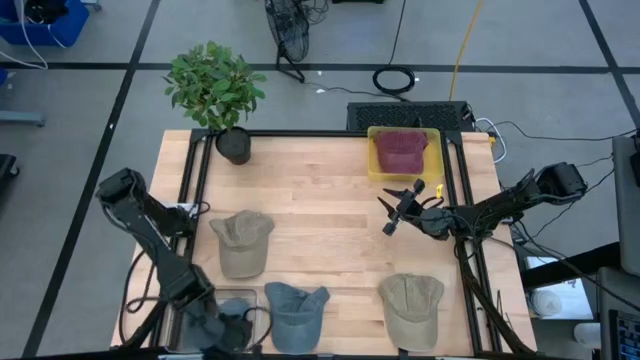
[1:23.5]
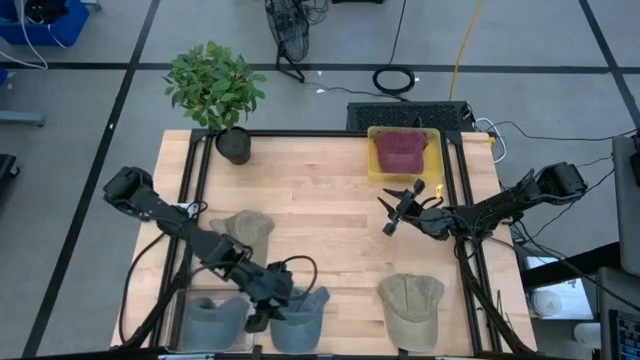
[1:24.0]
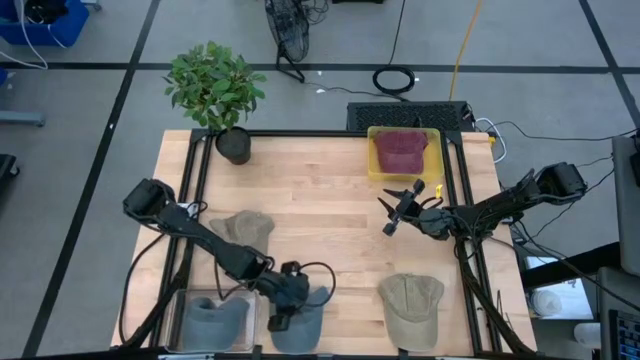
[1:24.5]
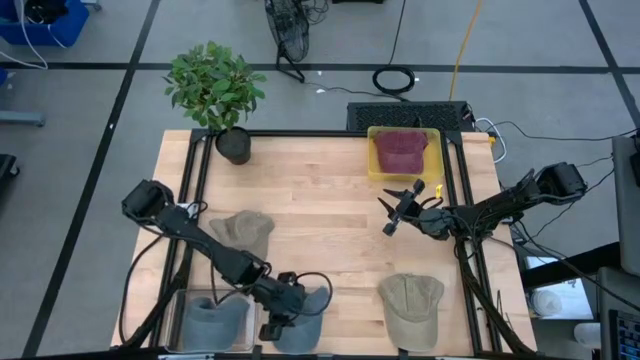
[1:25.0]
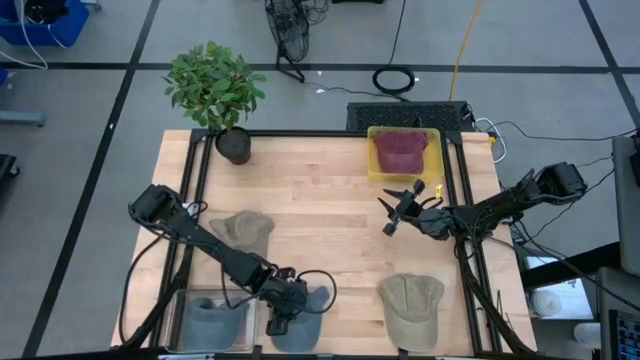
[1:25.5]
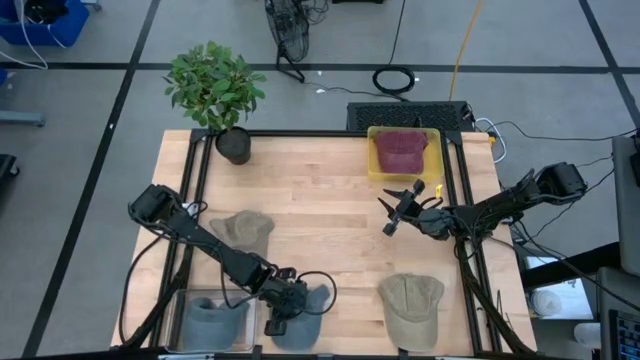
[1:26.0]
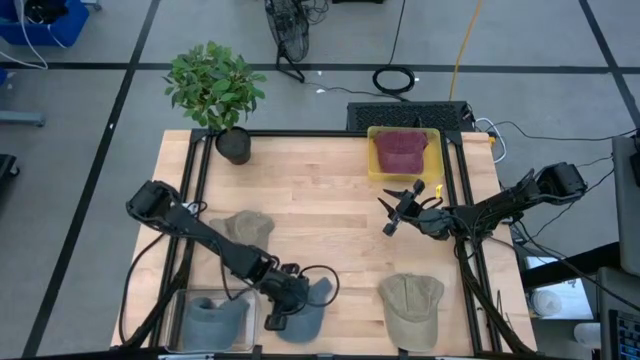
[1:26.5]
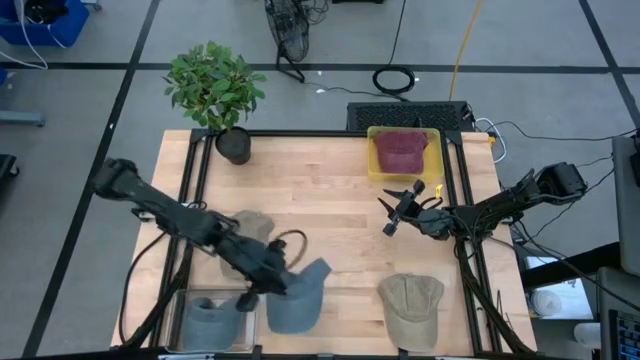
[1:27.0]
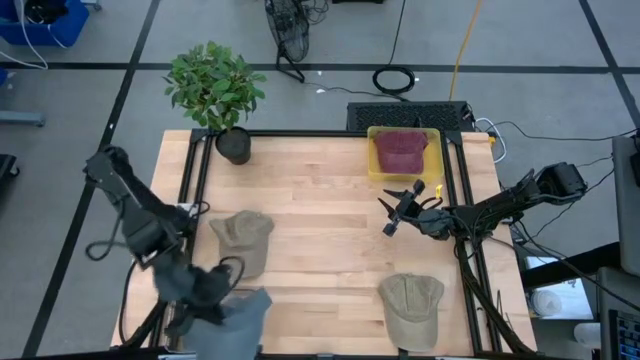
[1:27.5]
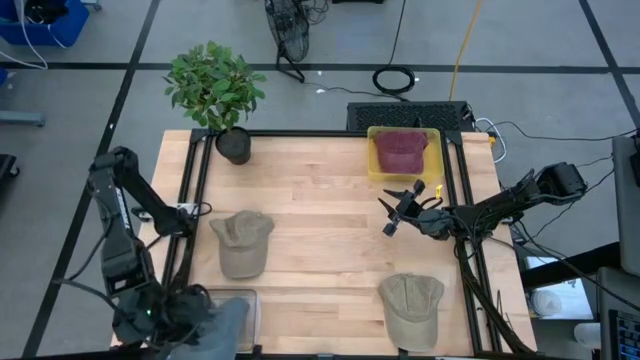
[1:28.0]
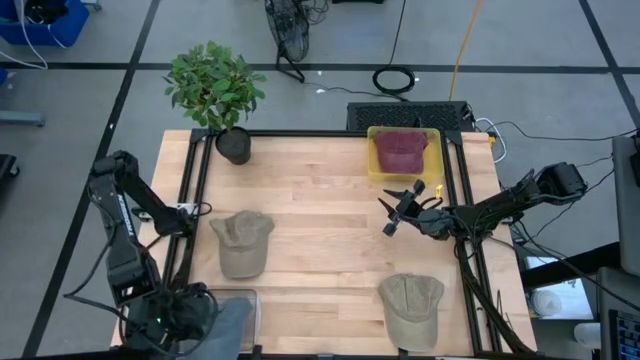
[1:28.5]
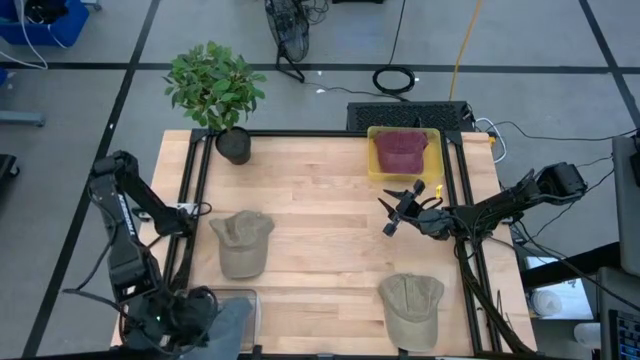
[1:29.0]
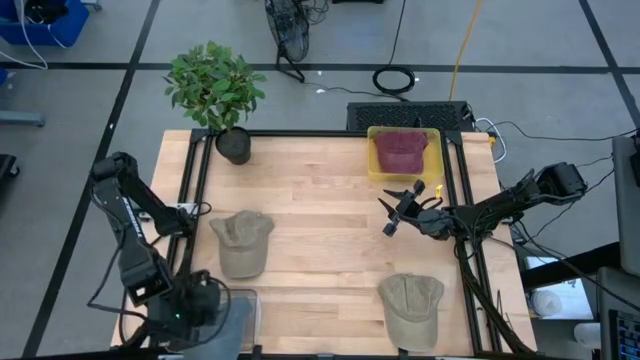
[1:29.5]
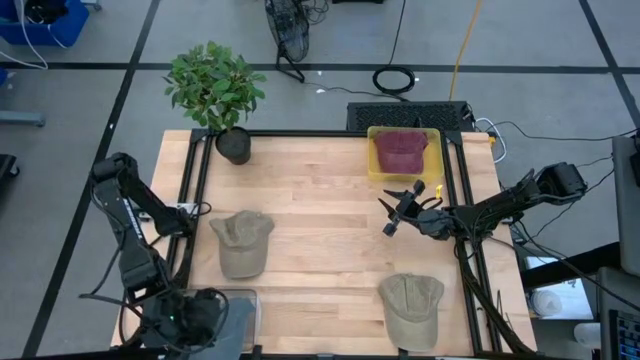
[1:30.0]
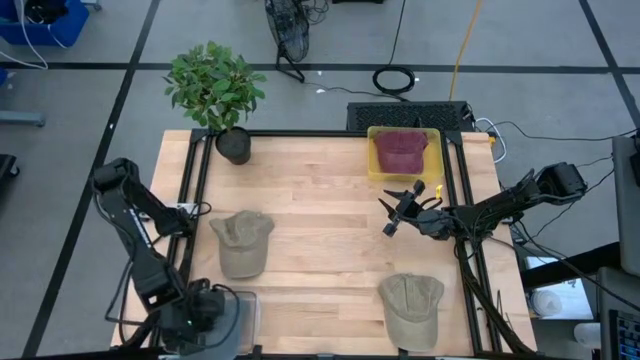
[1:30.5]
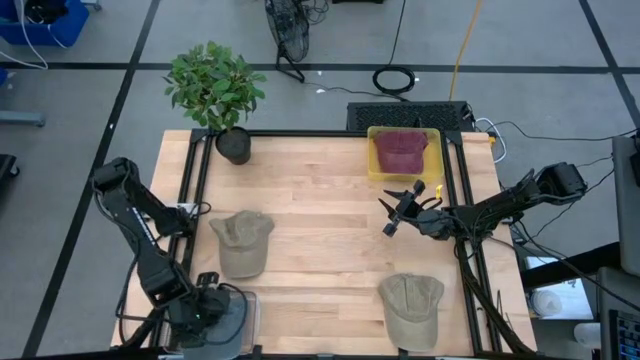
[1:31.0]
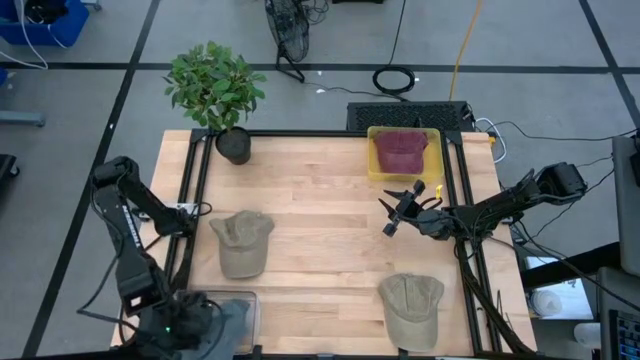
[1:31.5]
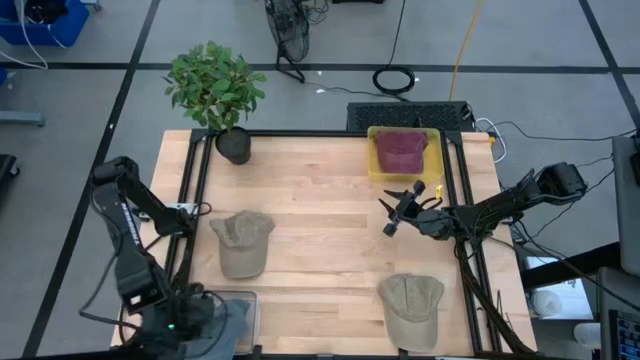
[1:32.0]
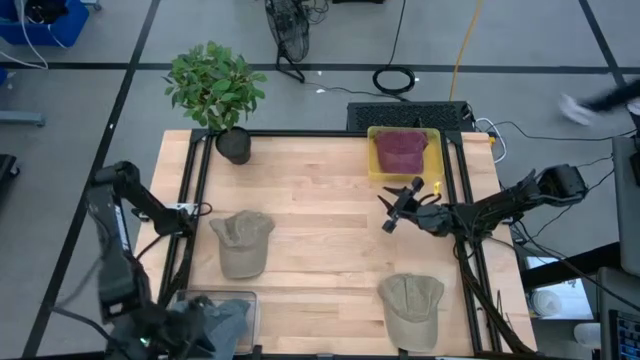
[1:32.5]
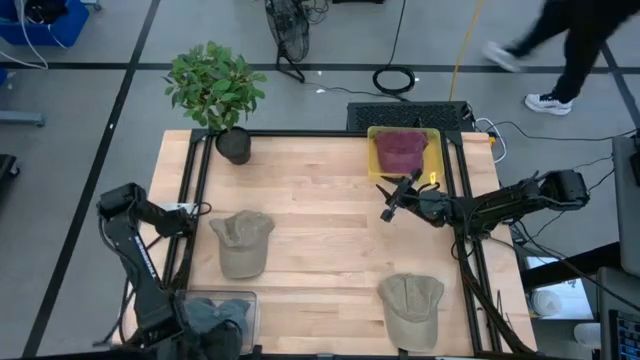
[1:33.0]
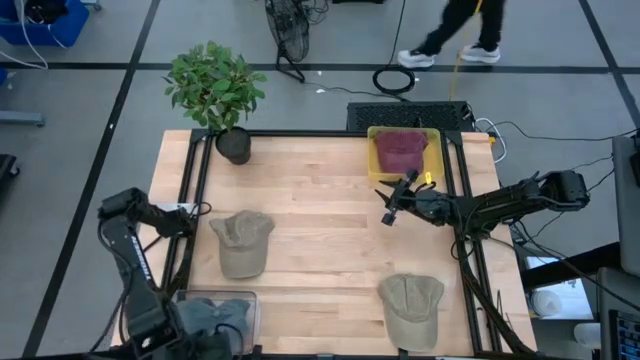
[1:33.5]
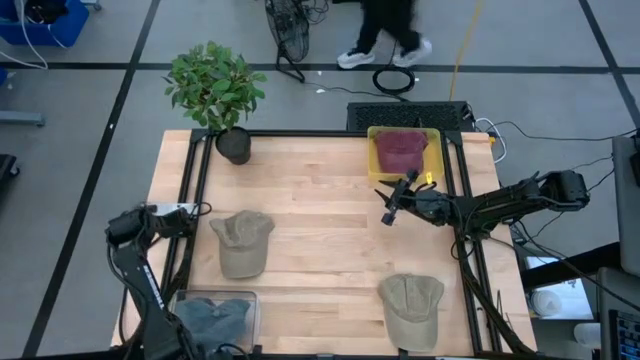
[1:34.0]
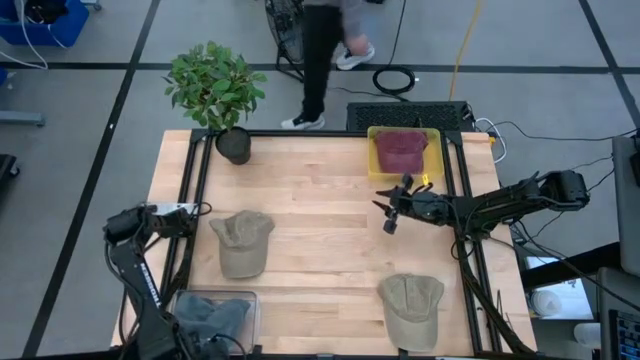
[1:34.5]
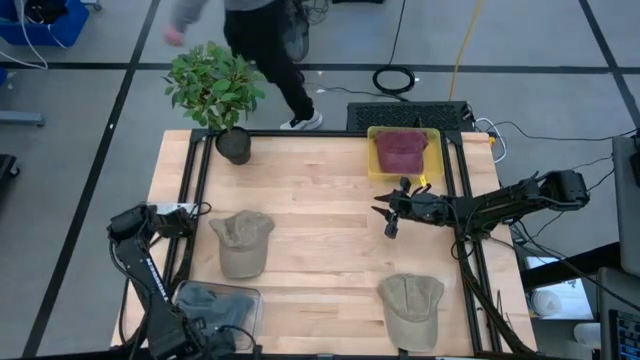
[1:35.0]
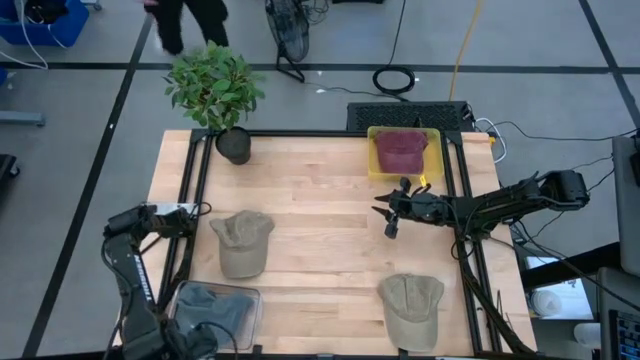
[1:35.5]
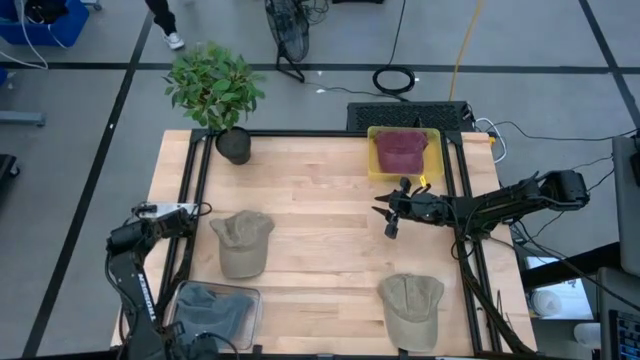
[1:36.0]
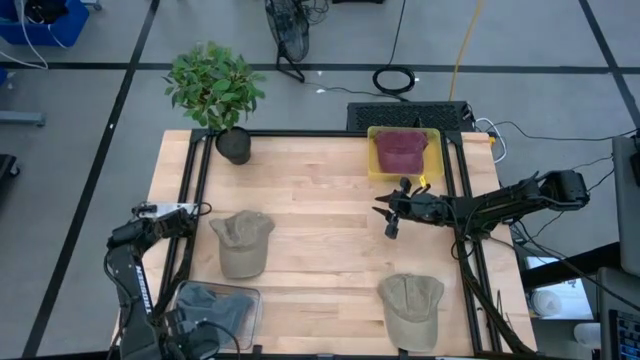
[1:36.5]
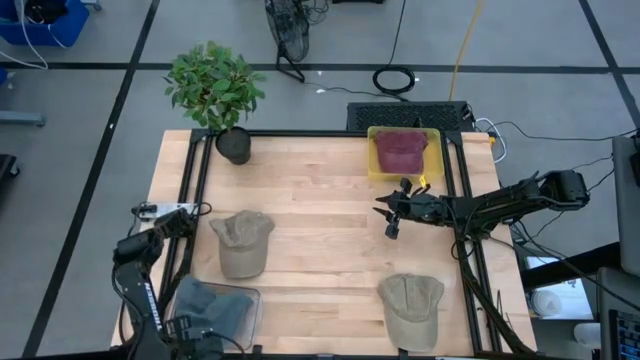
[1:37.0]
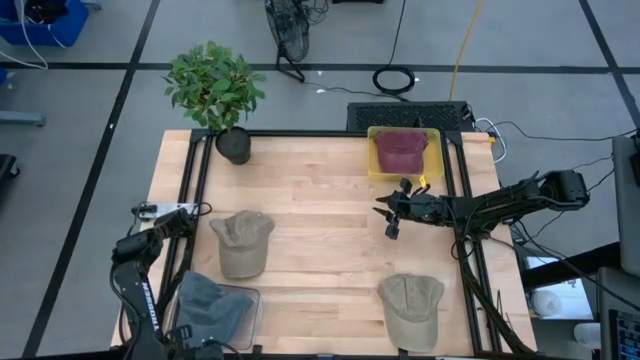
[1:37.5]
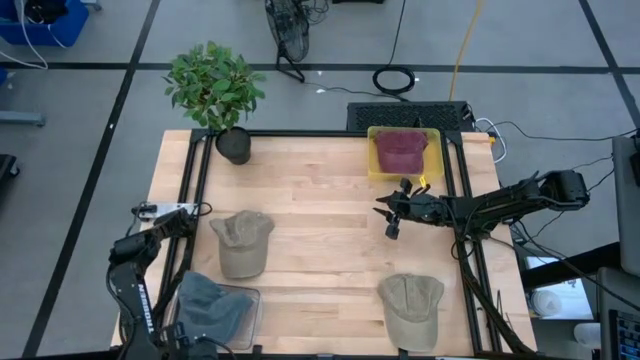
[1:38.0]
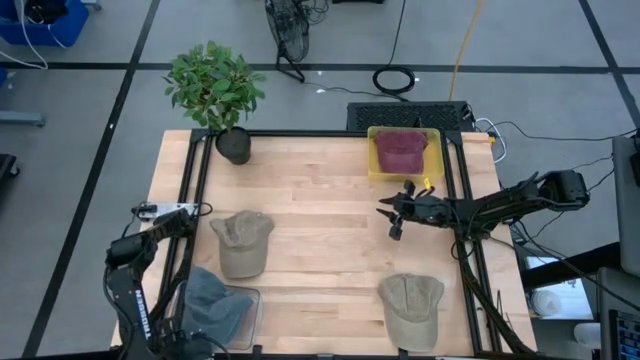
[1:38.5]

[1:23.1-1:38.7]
Task: Pick & Place hat
Put the gray cap into the transparent bin

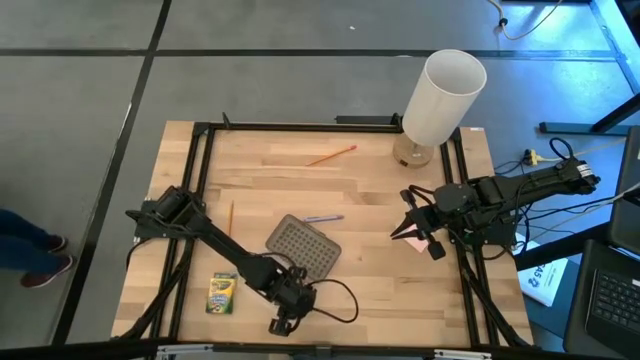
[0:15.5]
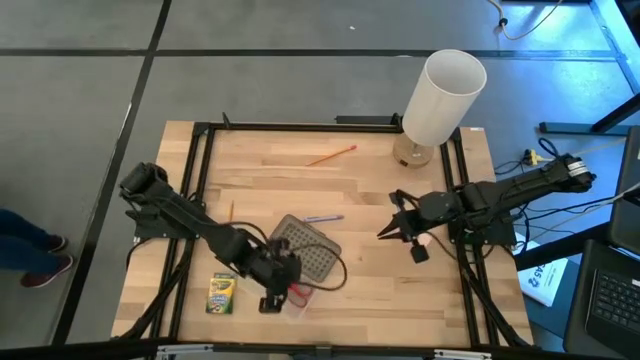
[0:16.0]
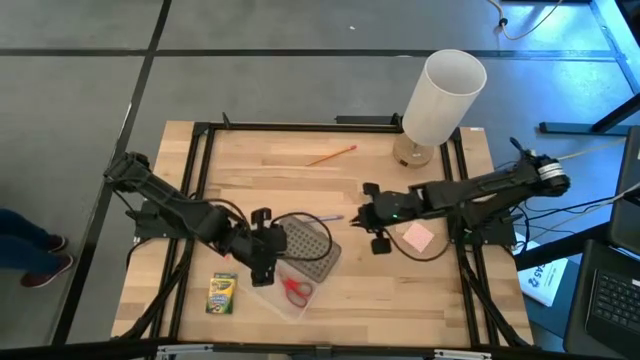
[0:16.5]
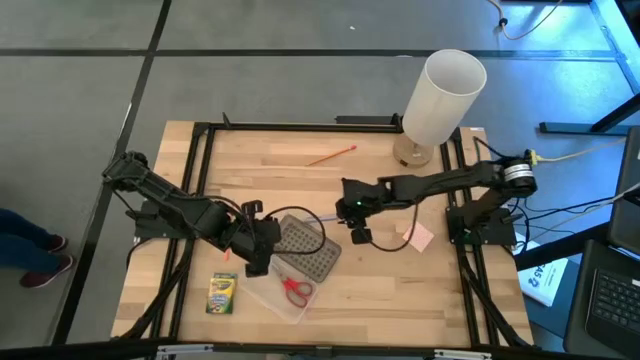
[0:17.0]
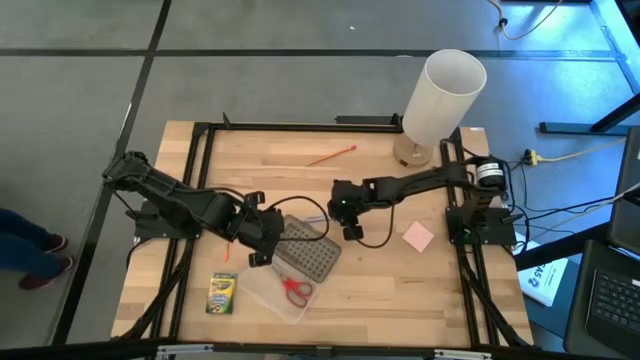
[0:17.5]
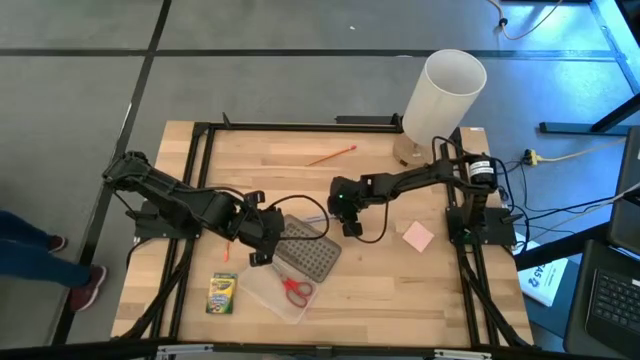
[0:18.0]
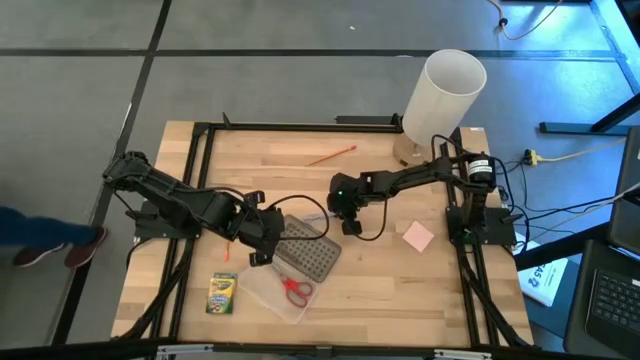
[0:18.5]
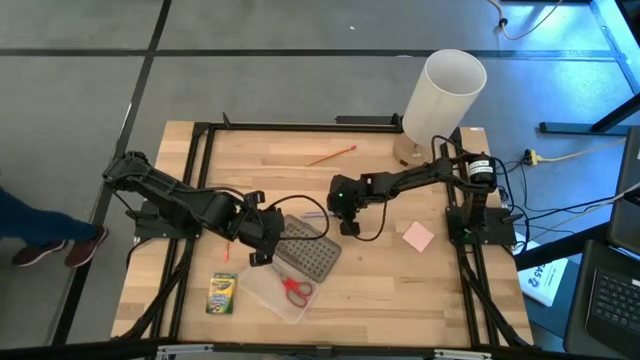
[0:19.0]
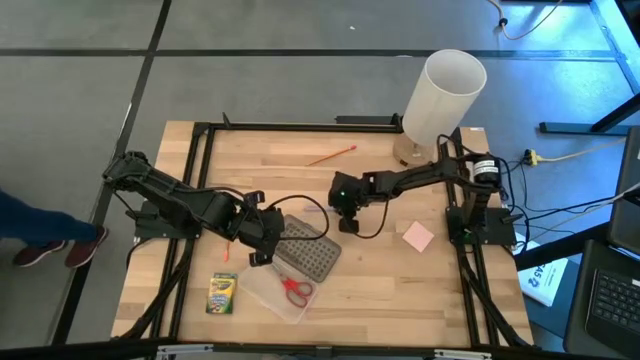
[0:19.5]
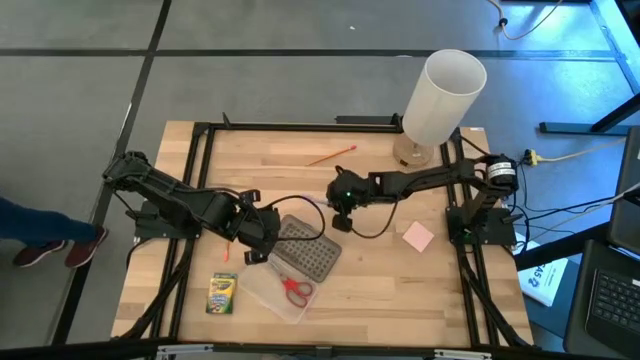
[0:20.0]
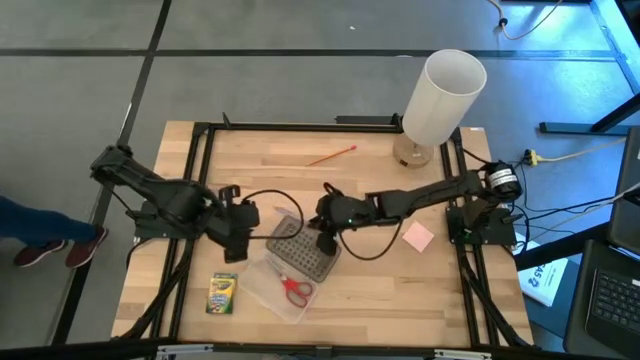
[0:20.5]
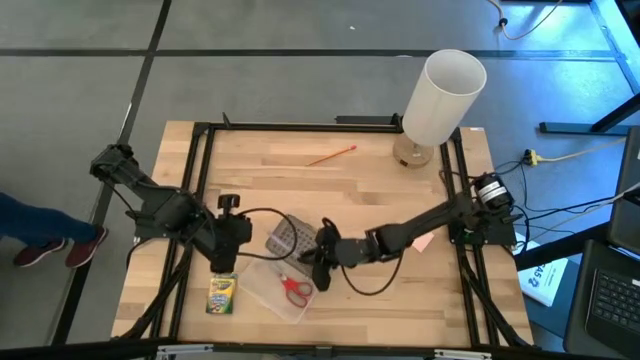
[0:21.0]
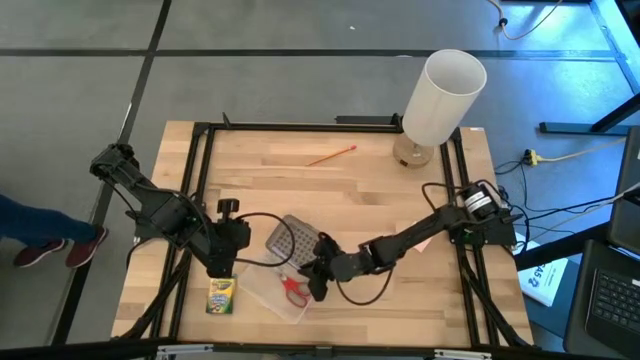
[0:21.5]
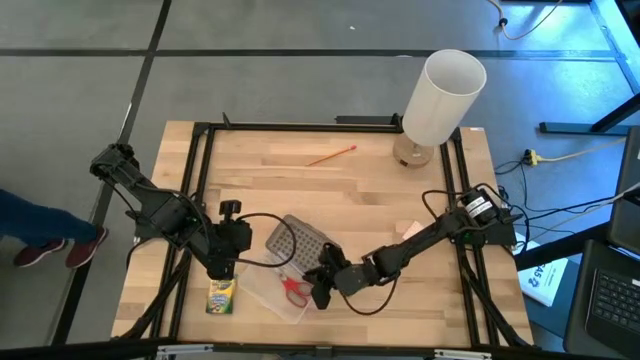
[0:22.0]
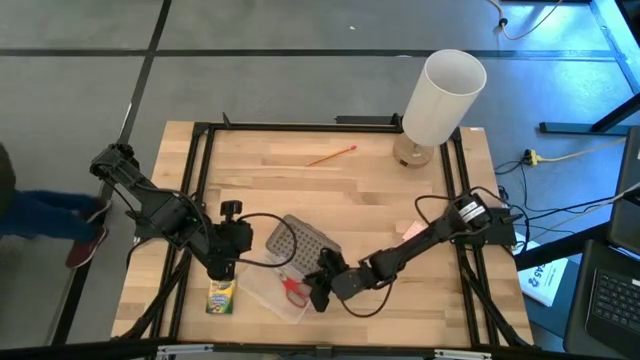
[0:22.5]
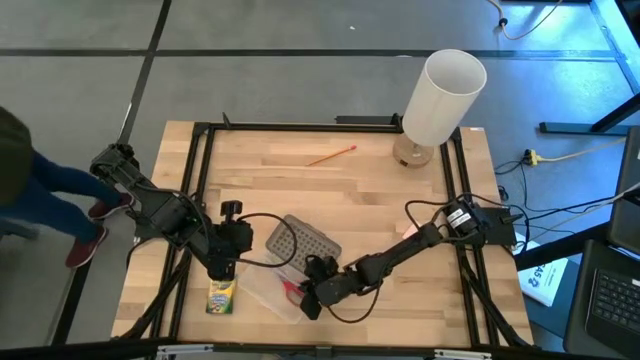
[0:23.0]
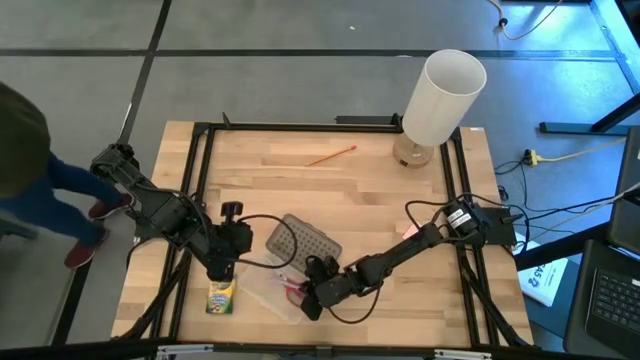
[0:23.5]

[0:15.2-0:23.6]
Task: Pack school essentials
Put the light blue pen into the black supply box
